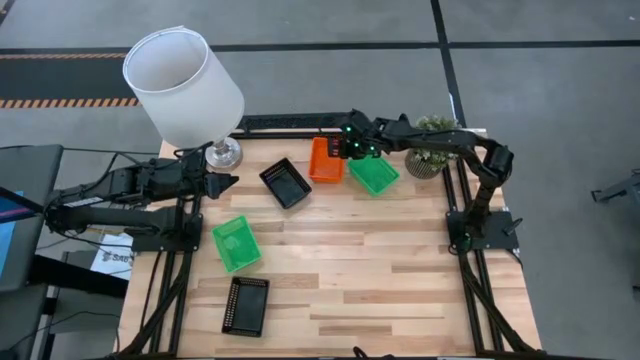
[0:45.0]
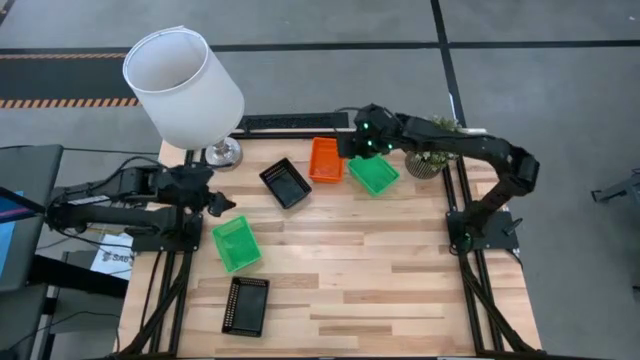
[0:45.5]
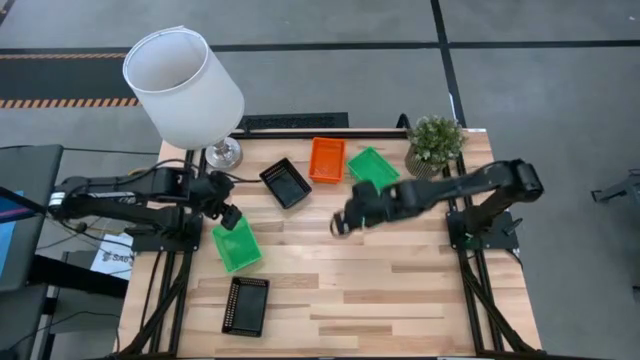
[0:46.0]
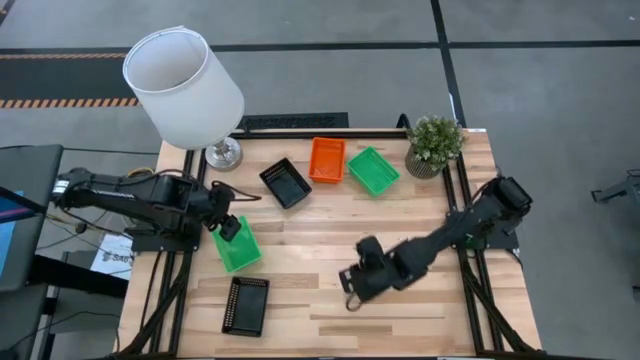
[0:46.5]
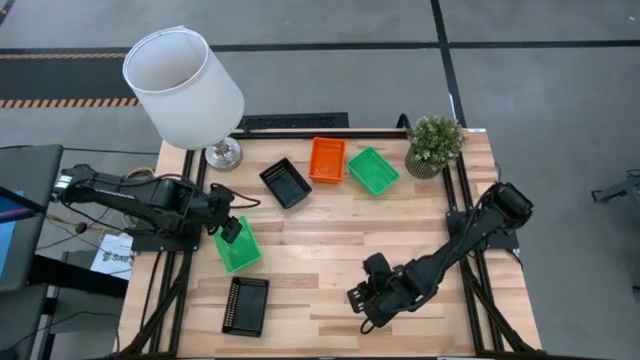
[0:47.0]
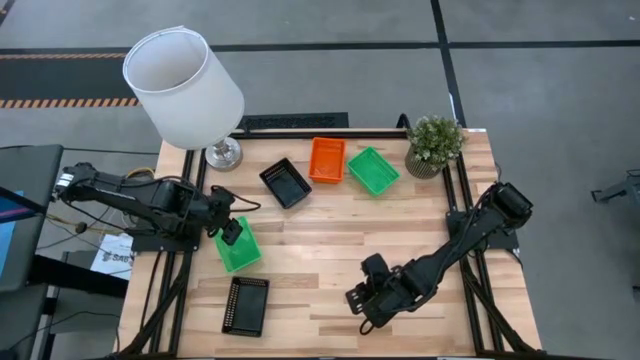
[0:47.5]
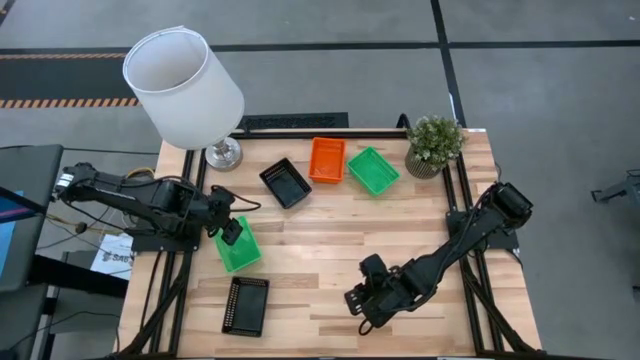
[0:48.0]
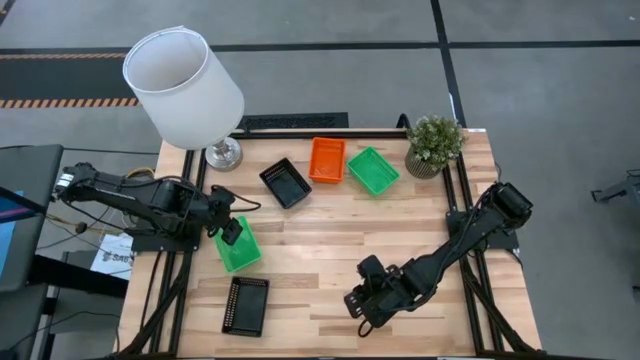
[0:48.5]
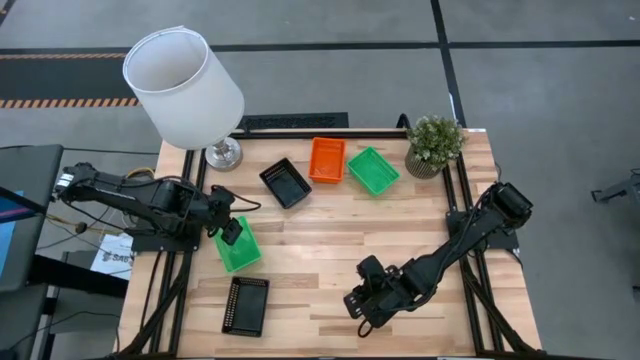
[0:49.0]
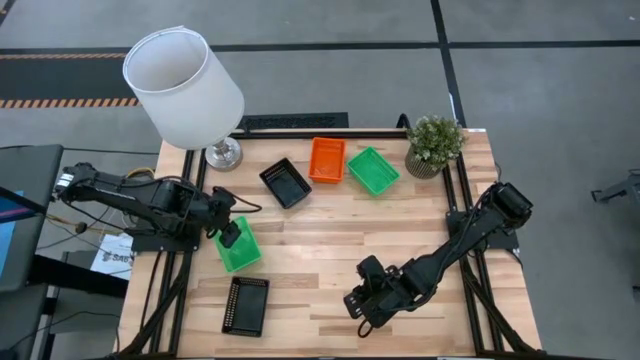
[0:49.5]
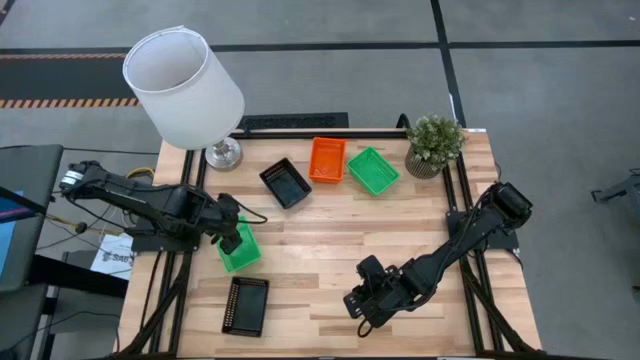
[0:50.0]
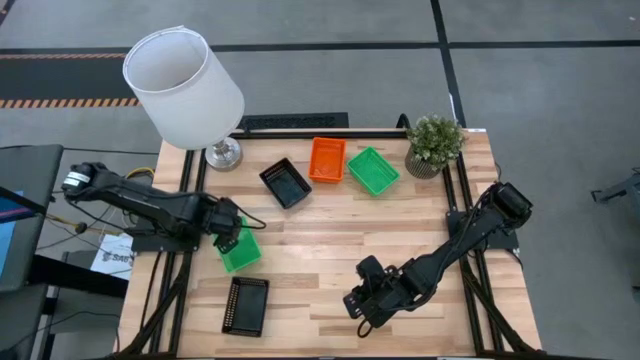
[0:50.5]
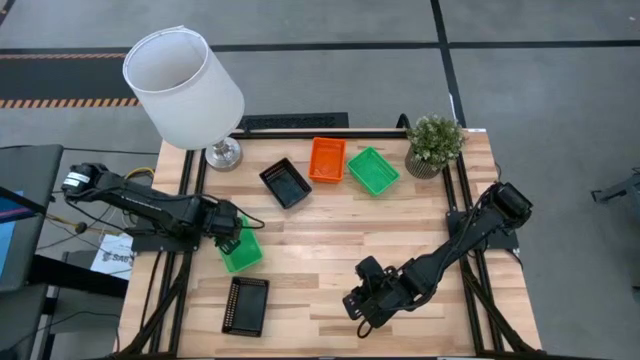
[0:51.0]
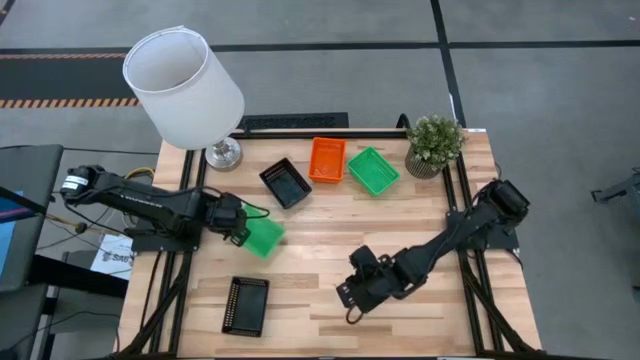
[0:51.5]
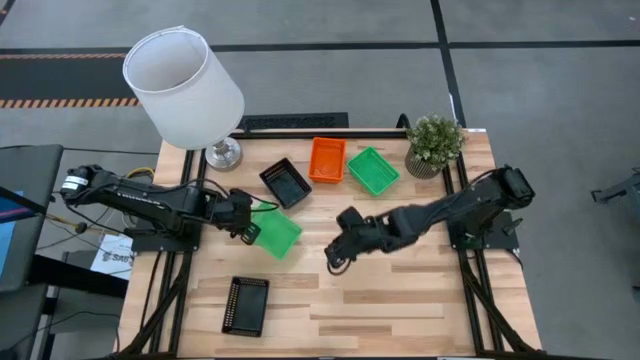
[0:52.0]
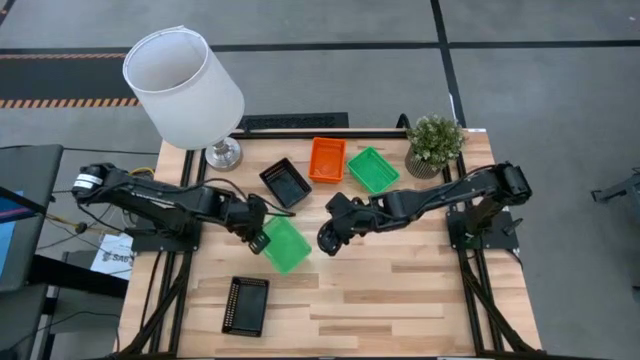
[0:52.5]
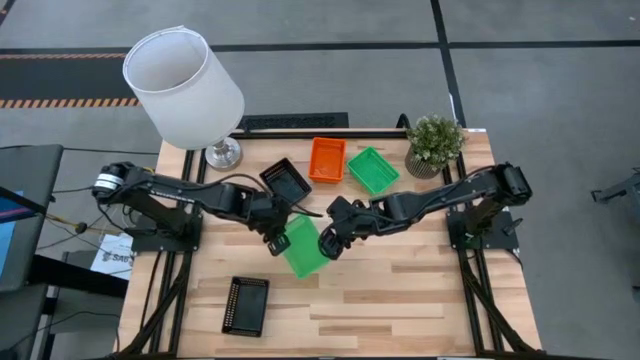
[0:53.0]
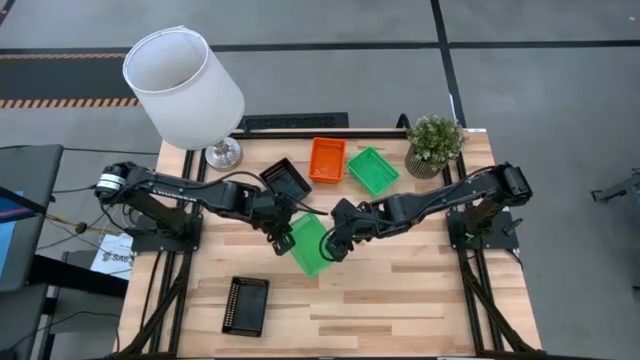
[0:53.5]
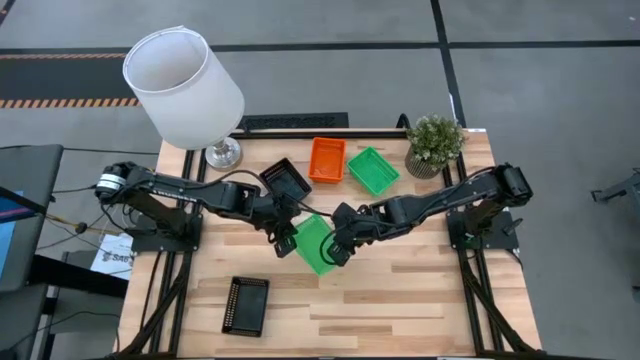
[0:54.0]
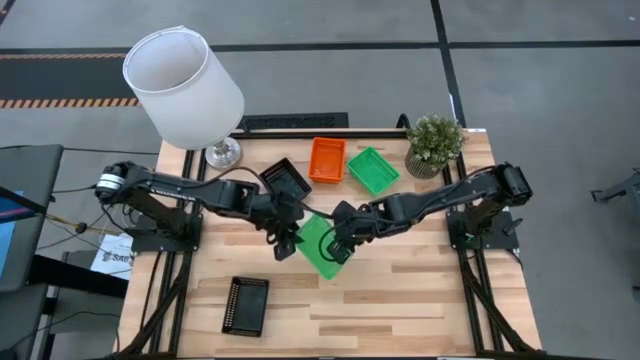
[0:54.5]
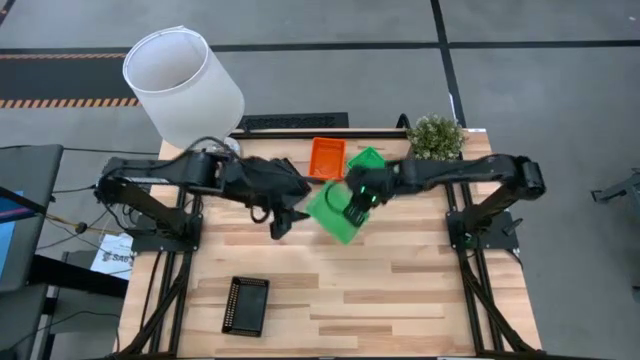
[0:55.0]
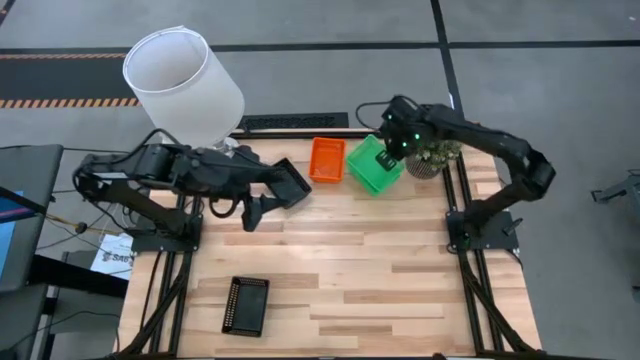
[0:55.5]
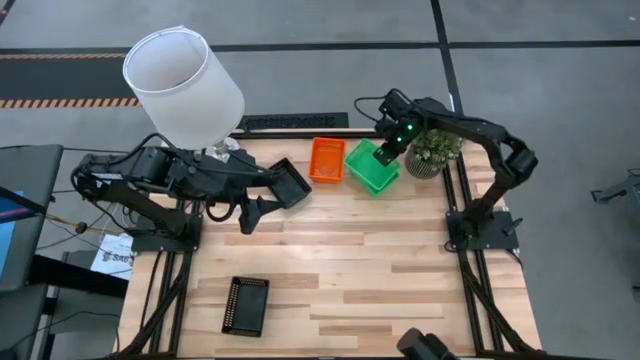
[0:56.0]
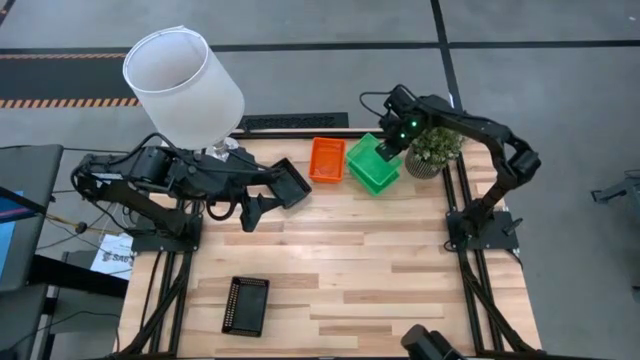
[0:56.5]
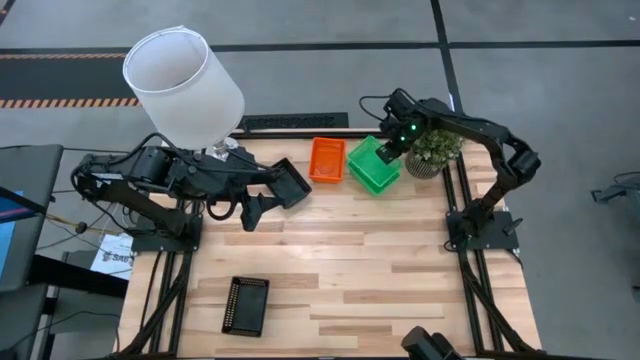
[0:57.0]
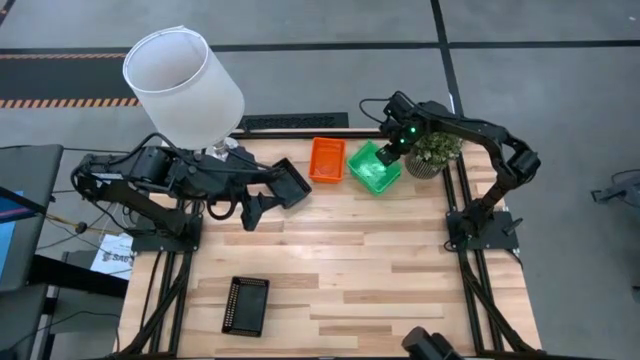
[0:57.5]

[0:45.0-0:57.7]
Stack the left green bin on top of the right green bin

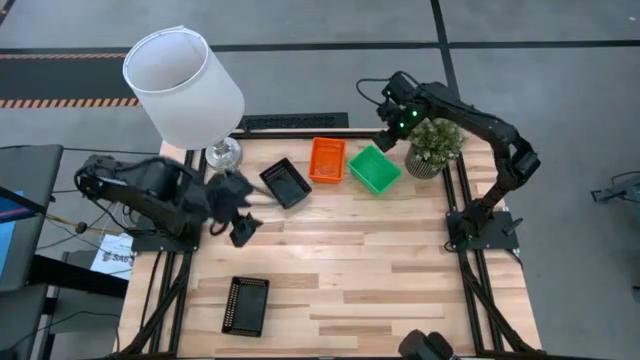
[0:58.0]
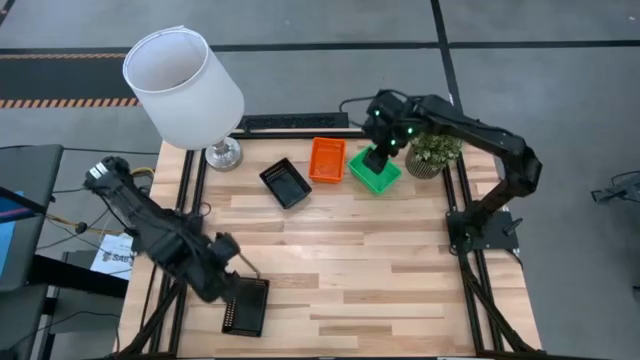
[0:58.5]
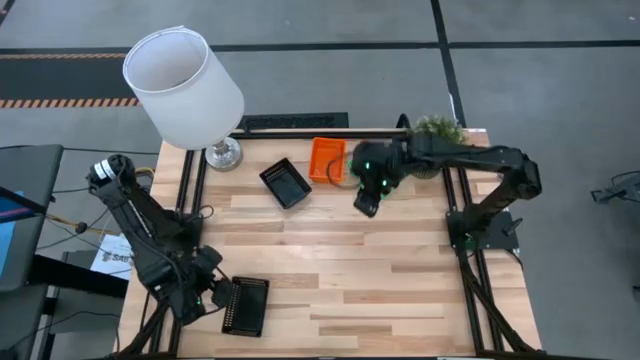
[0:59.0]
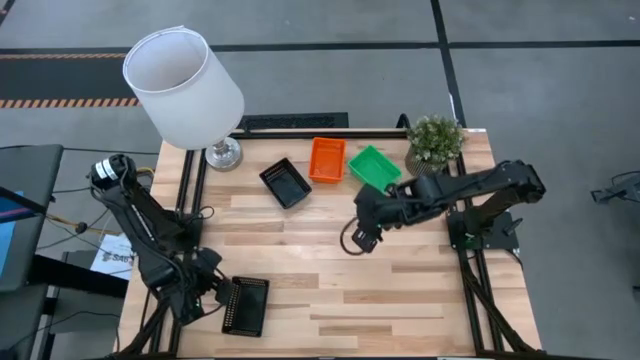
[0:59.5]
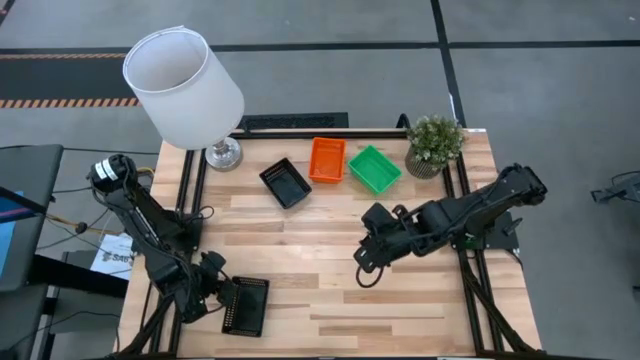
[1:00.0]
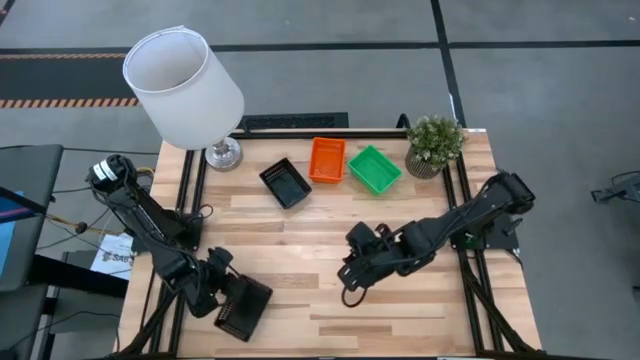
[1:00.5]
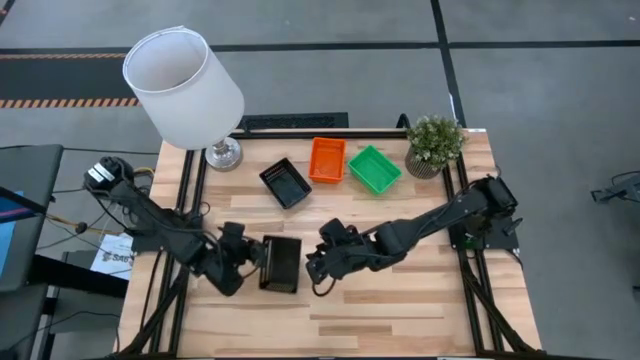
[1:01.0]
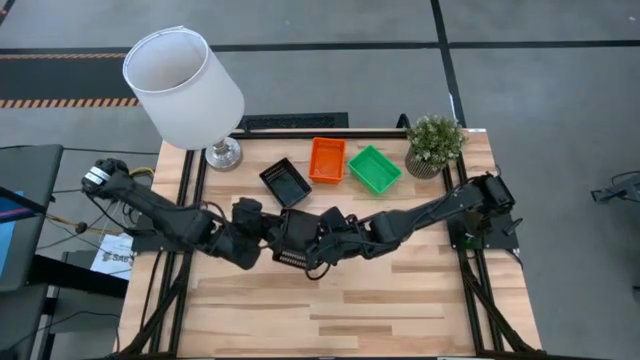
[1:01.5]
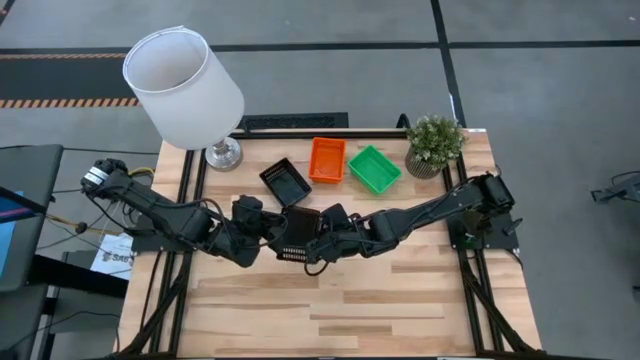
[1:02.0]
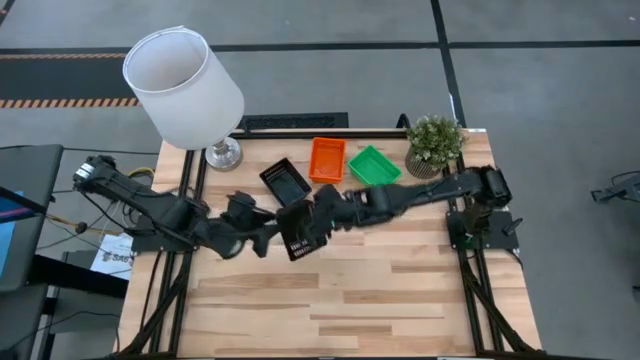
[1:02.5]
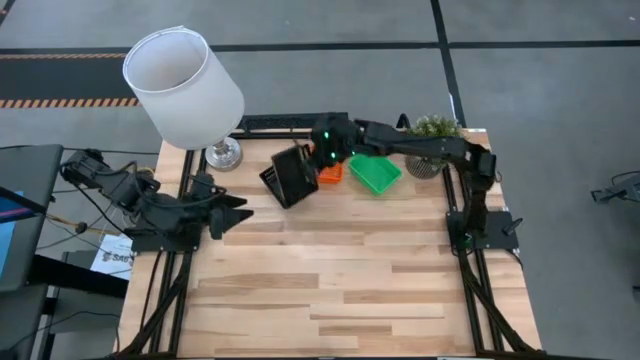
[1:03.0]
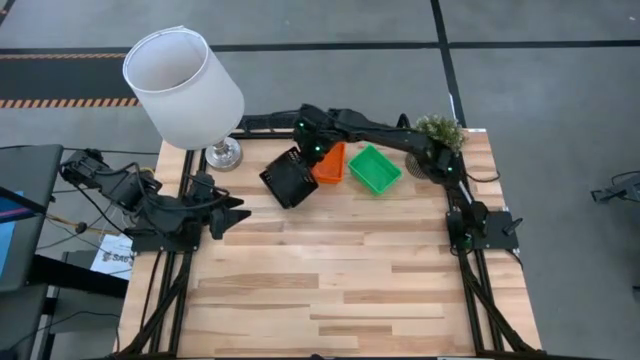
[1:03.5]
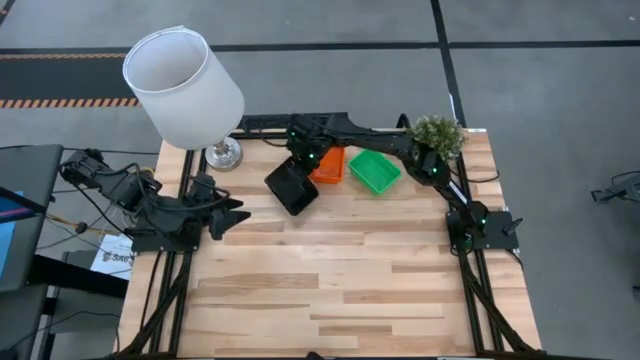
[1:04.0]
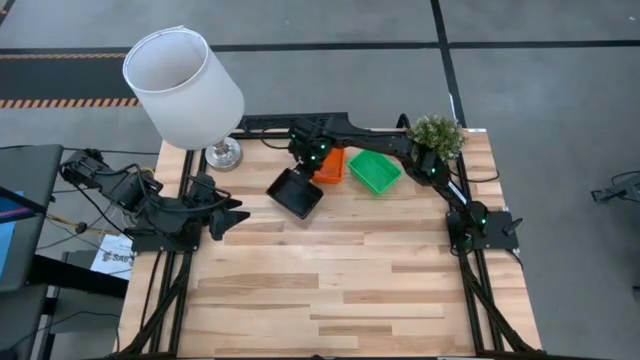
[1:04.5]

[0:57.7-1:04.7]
Stack the bottom black bin on top of the top black bin
